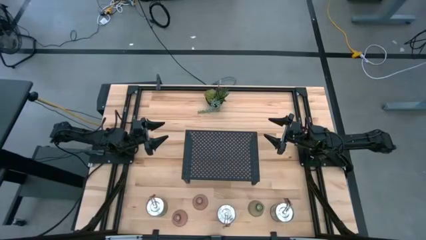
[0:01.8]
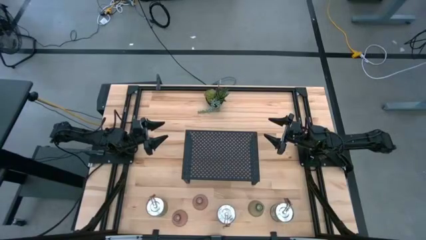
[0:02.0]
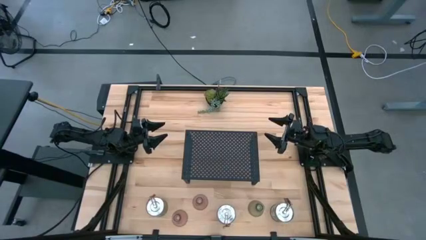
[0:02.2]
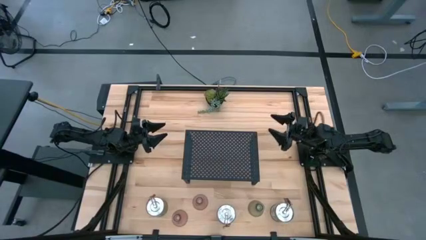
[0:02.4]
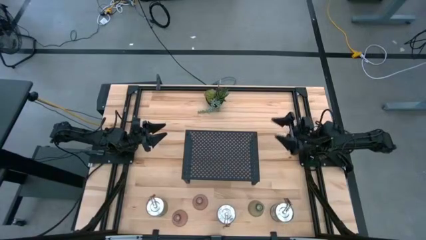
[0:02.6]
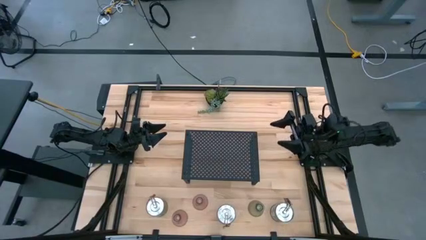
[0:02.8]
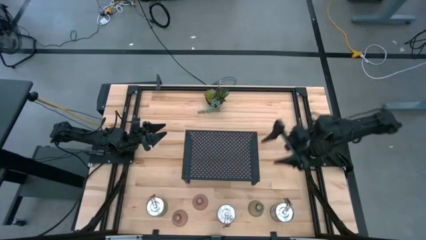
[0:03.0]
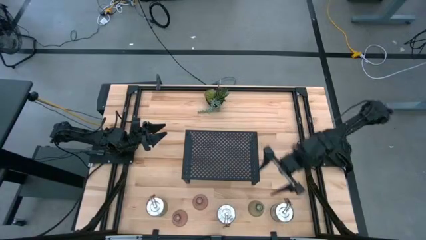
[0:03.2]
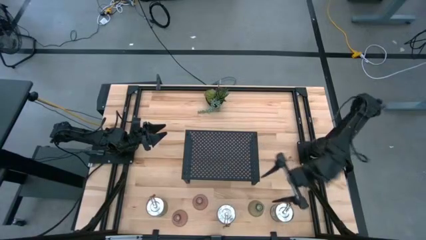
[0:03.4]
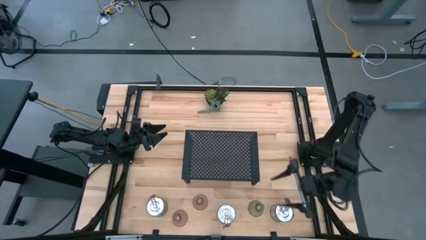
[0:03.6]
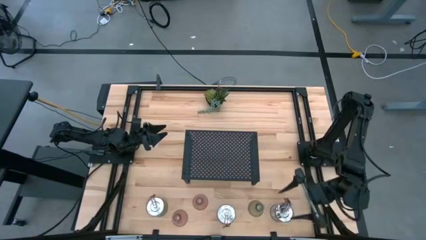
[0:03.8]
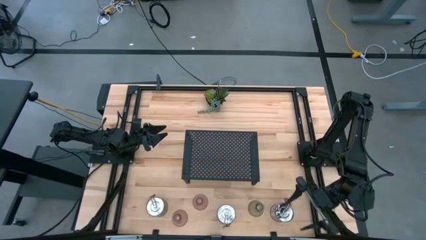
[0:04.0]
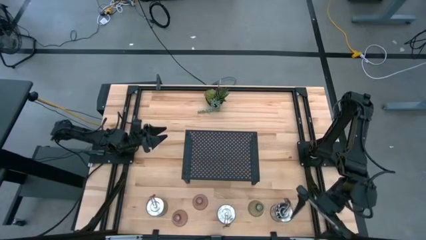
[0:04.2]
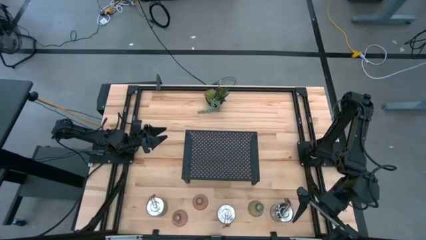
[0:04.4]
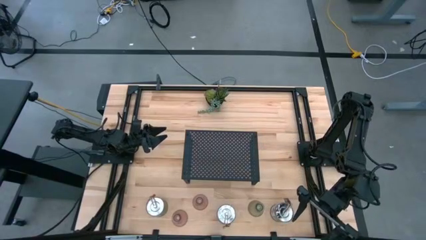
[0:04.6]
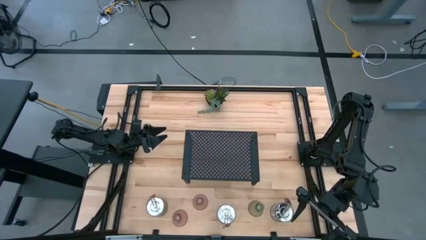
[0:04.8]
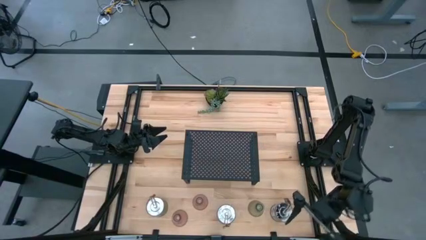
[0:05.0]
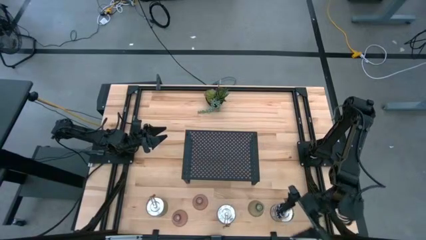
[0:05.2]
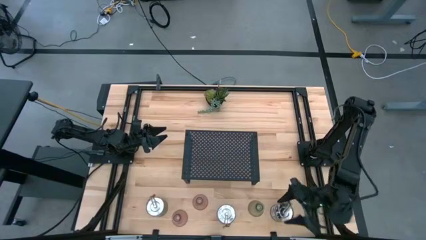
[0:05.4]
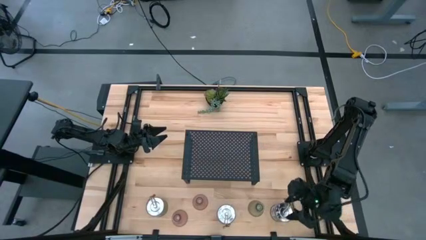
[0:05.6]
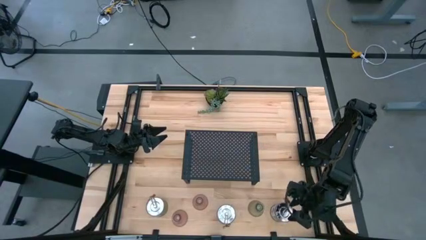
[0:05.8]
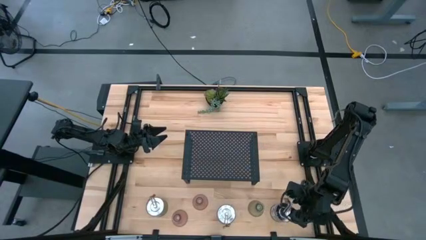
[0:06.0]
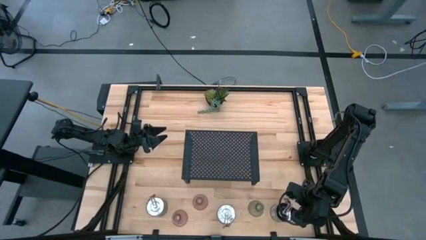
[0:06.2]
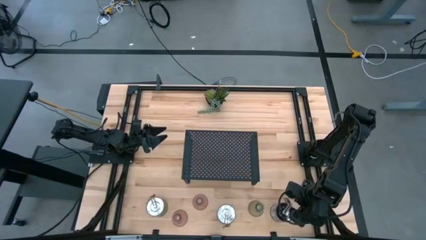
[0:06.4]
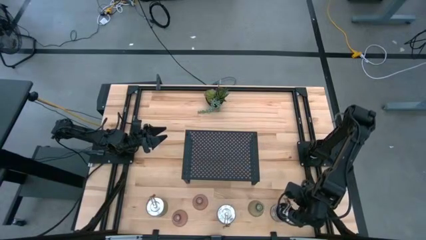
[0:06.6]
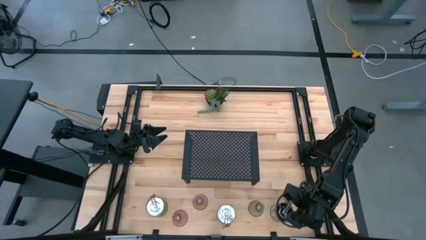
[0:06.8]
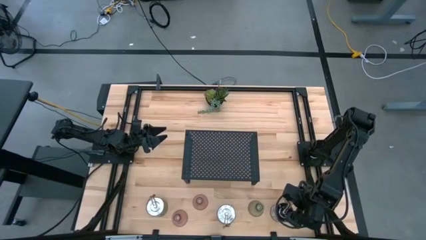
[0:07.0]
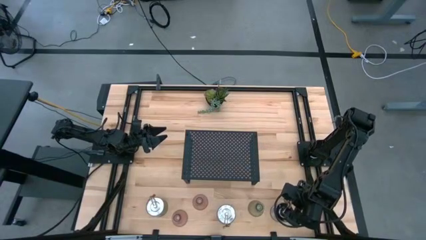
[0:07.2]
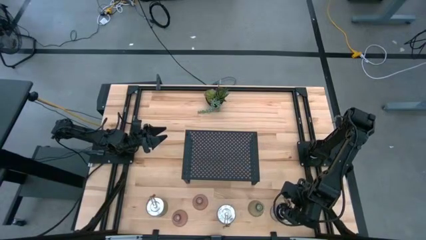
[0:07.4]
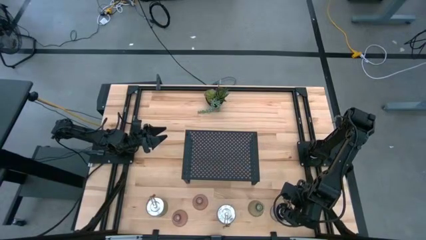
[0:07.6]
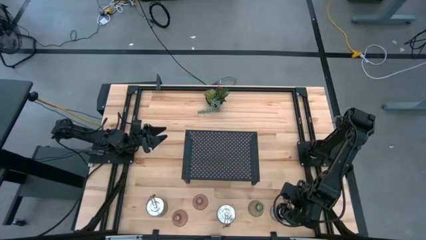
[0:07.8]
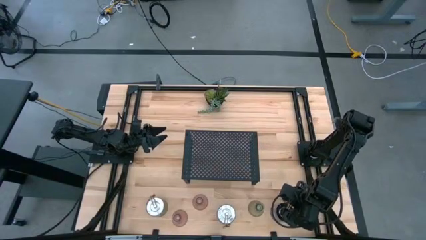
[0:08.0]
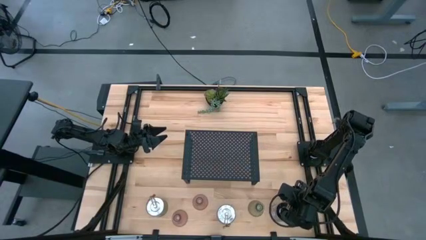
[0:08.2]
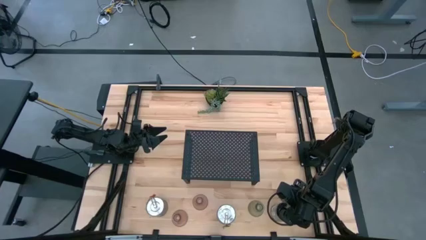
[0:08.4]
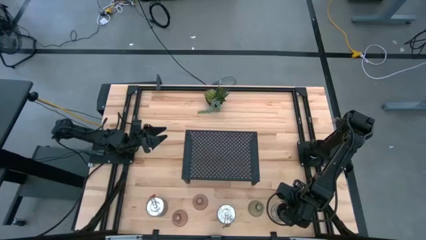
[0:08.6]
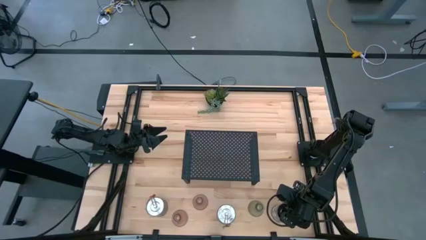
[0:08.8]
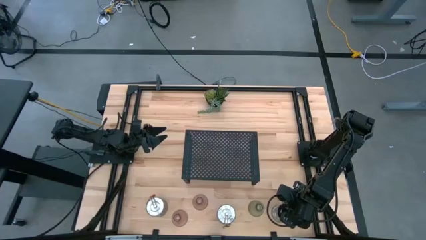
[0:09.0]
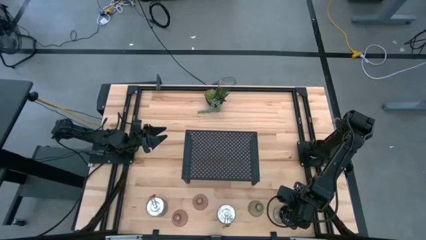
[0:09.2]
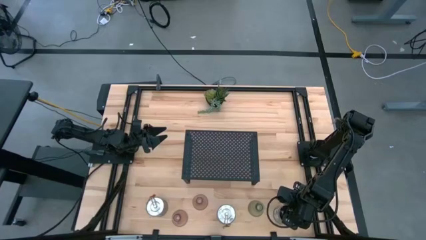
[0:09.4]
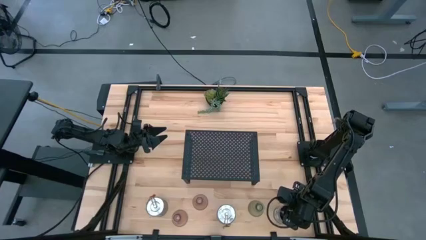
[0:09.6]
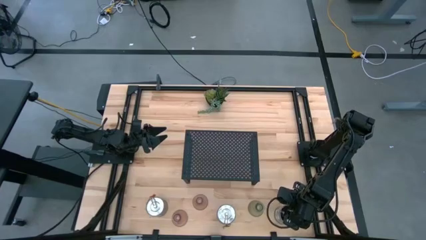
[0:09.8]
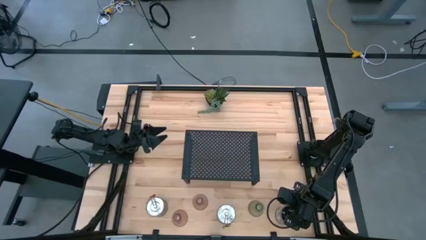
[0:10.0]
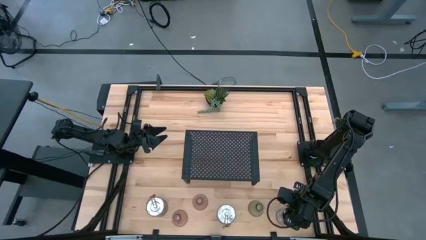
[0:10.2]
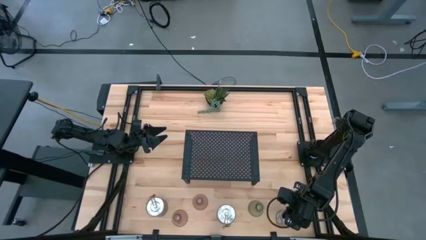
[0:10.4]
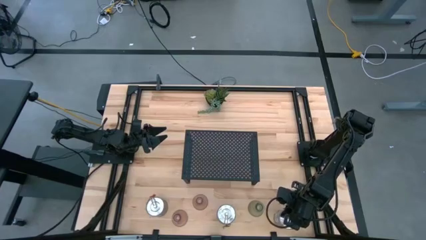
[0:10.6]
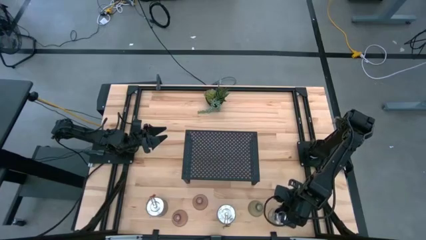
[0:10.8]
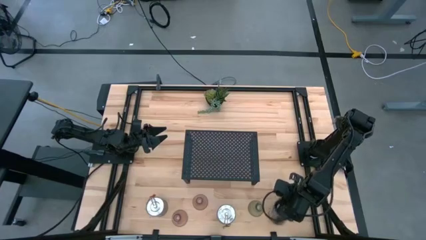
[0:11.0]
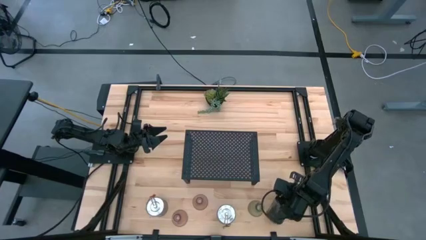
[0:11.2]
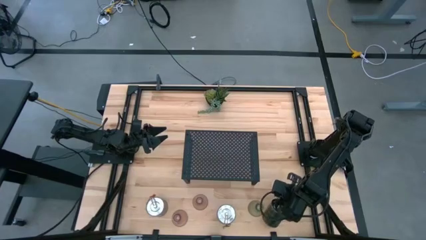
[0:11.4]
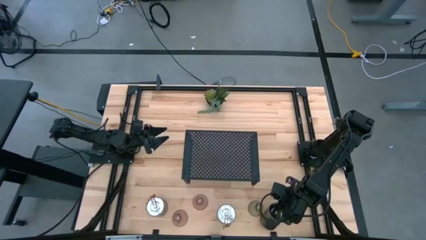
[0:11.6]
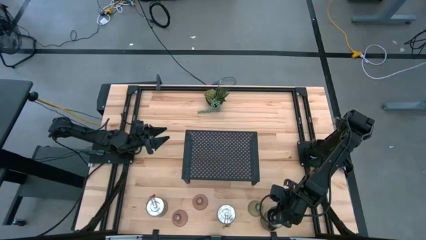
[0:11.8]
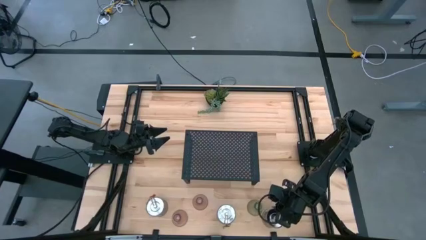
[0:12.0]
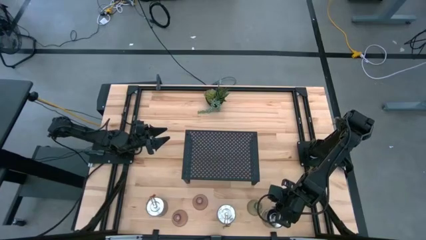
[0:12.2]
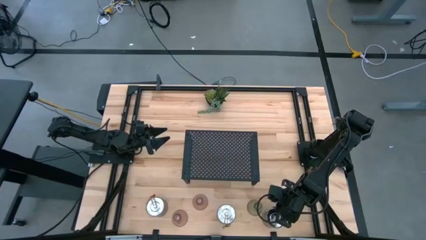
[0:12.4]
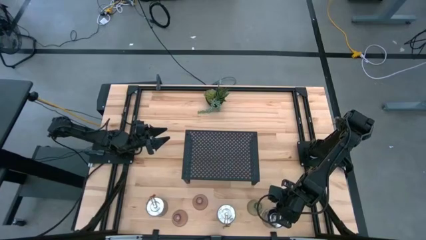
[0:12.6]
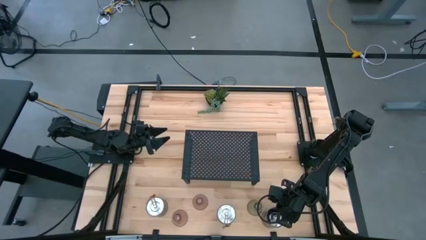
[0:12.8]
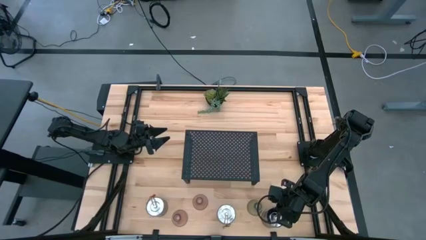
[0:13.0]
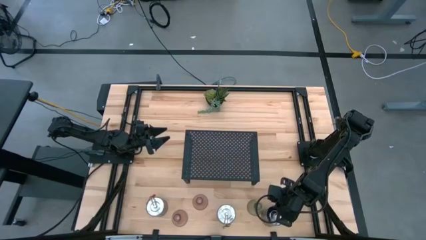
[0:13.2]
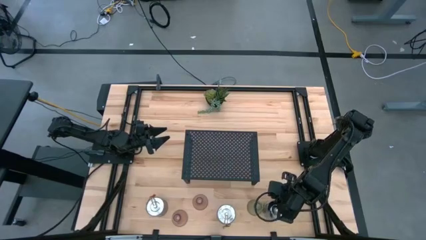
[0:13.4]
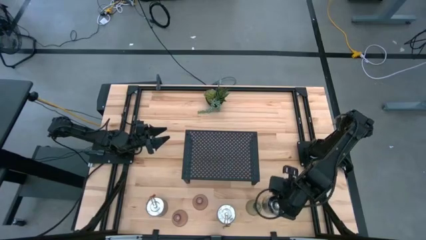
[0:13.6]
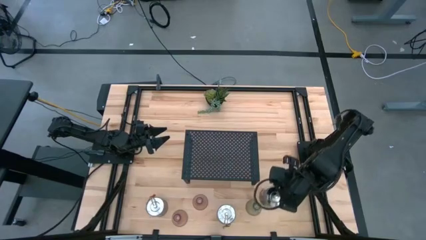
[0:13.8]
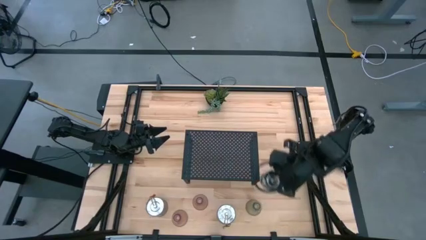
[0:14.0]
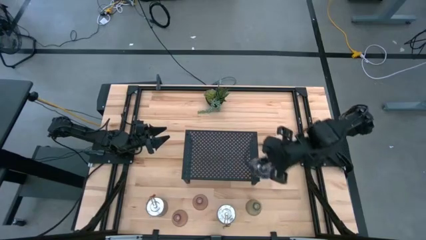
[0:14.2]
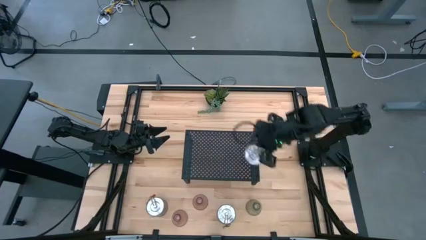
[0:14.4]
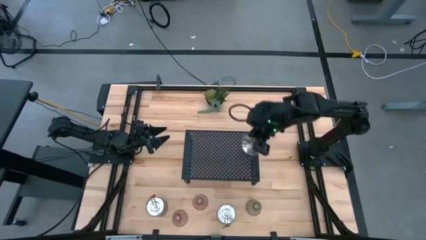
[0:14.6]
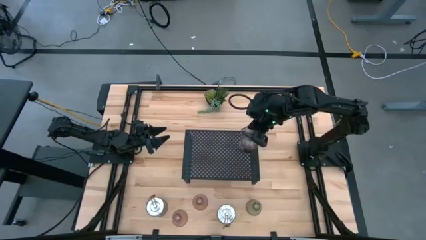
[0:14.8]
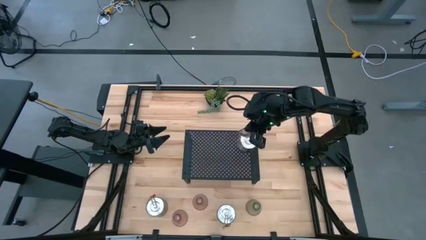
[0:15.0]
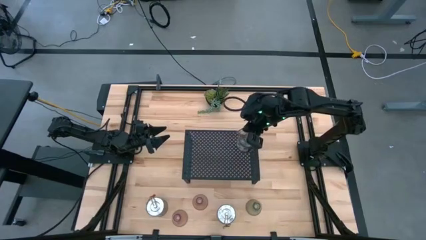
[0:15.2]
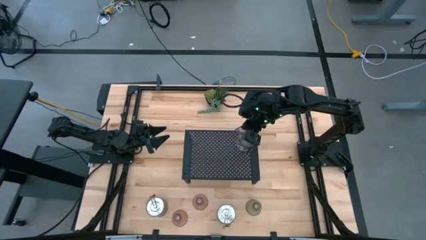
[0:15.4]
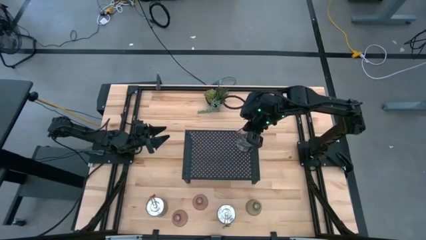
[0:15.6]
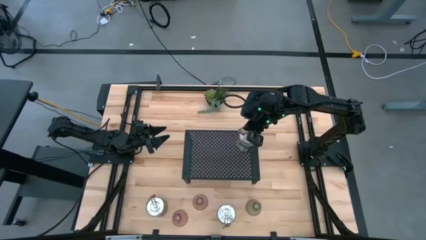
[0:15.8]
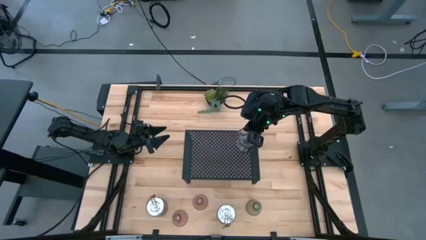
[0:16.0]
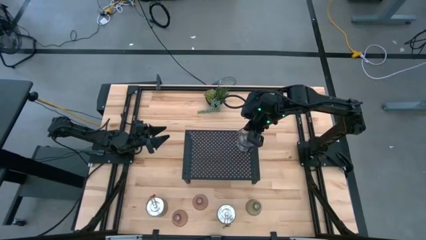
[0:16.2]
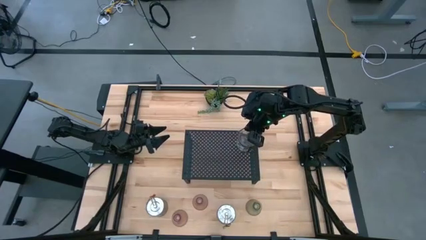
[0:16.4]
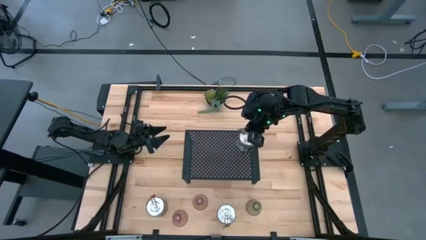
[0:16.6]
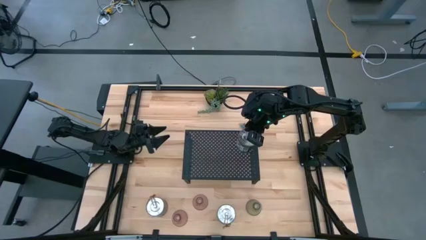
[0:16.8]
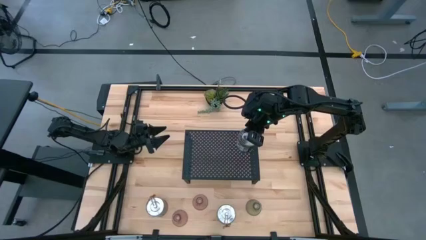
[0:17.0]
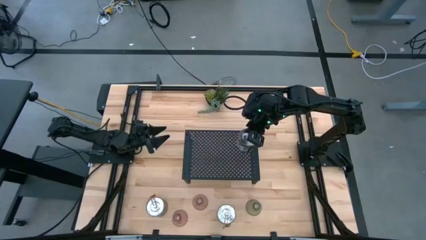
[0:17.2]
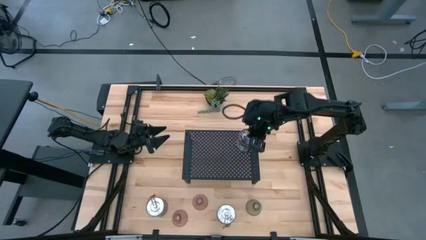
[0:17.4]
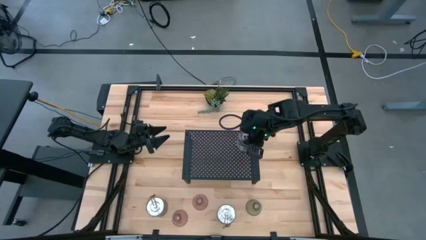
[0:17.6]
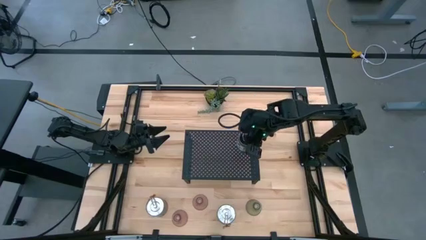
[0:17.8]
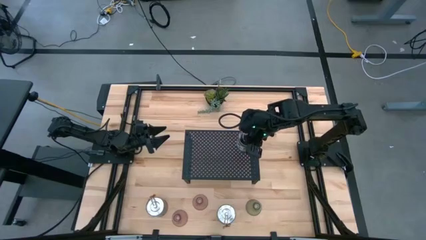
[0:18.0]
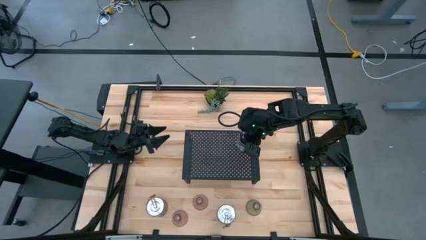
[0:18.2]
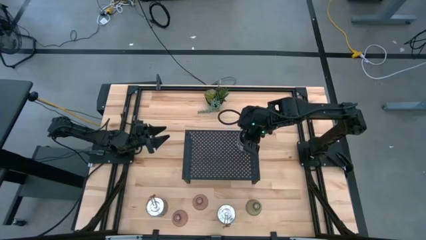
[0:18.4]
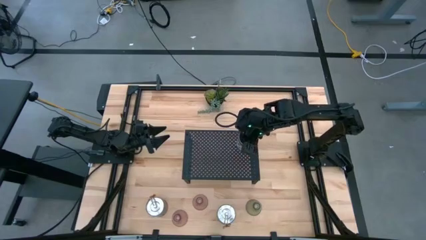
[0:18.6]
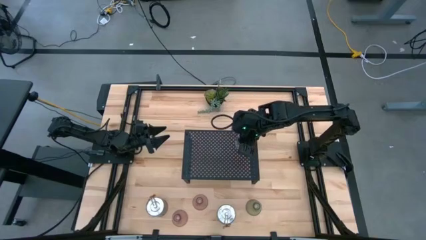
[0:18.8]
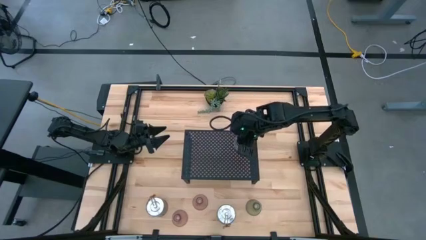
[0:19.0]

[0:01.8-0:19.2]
Task: Pick & Place candle stick holders
Put the right silver scented candle on the shelf
